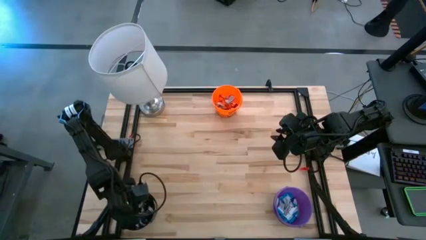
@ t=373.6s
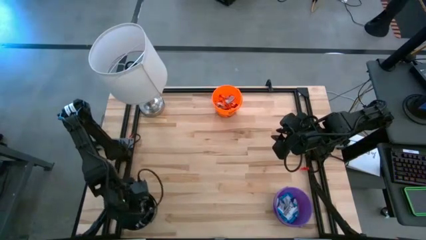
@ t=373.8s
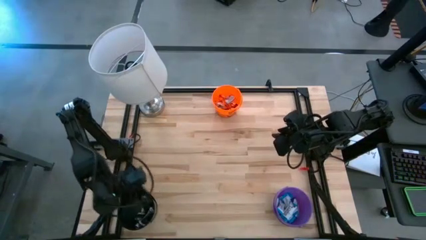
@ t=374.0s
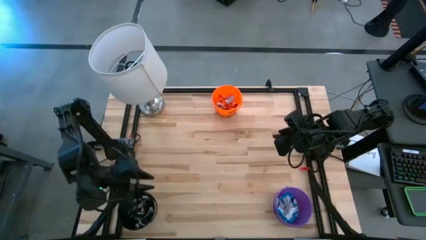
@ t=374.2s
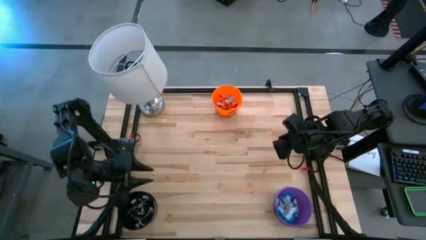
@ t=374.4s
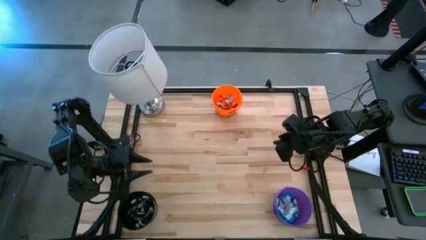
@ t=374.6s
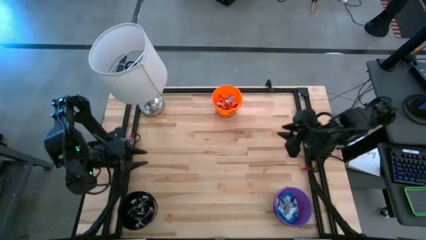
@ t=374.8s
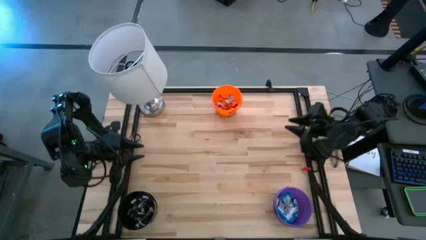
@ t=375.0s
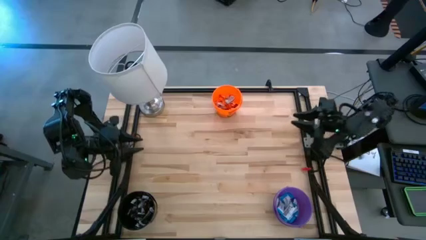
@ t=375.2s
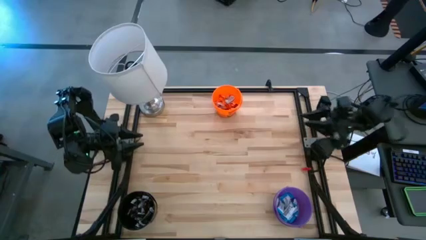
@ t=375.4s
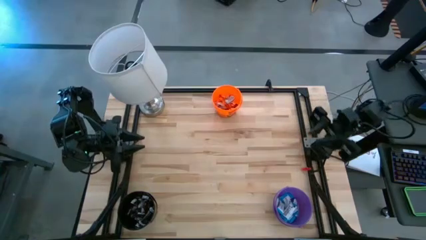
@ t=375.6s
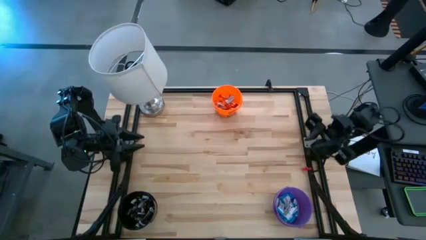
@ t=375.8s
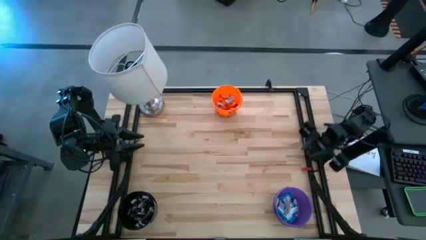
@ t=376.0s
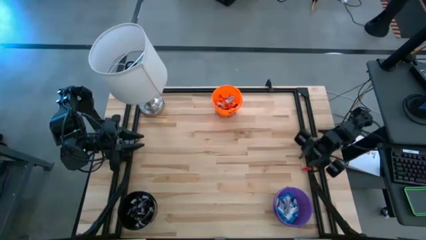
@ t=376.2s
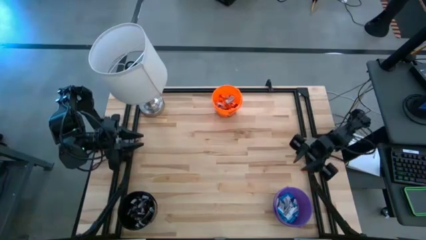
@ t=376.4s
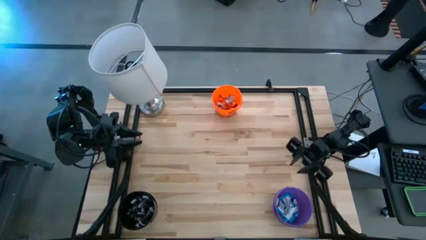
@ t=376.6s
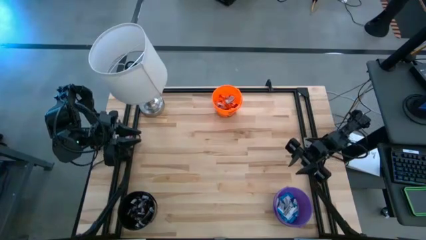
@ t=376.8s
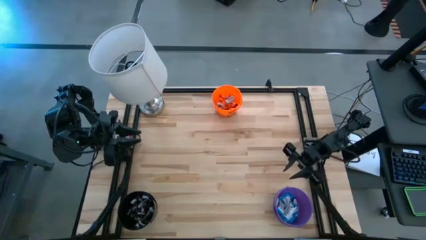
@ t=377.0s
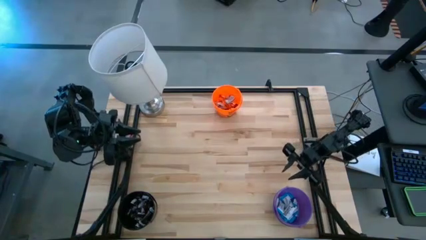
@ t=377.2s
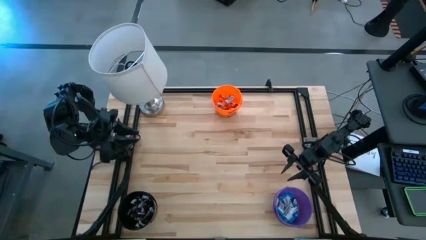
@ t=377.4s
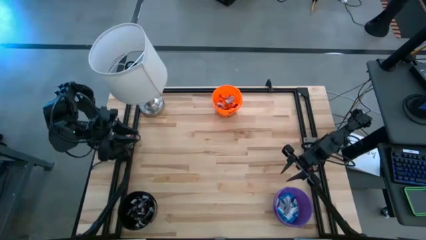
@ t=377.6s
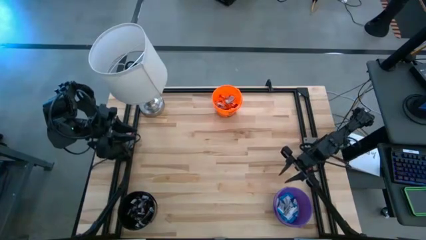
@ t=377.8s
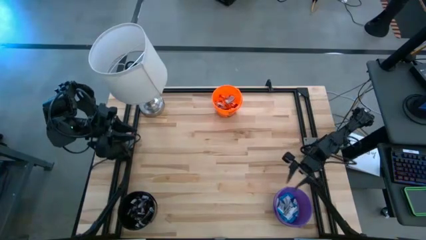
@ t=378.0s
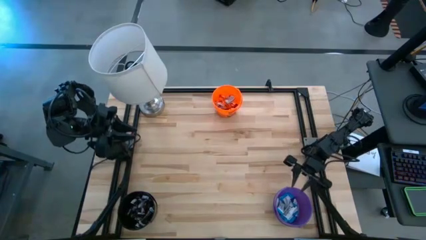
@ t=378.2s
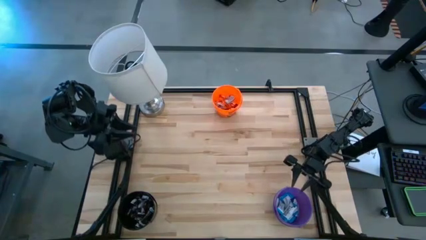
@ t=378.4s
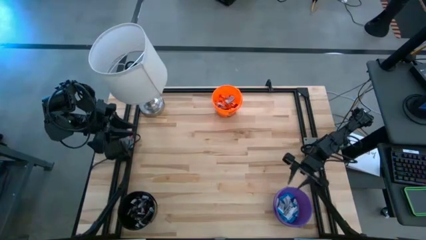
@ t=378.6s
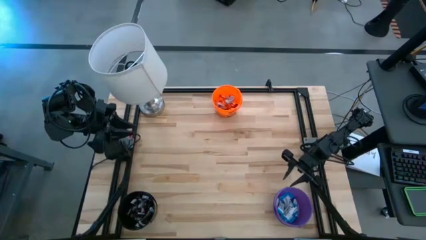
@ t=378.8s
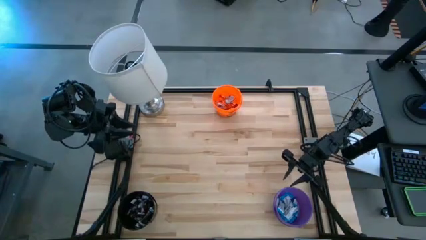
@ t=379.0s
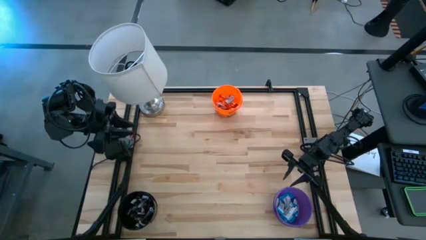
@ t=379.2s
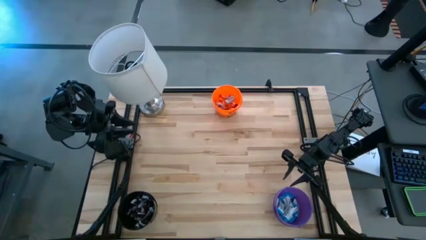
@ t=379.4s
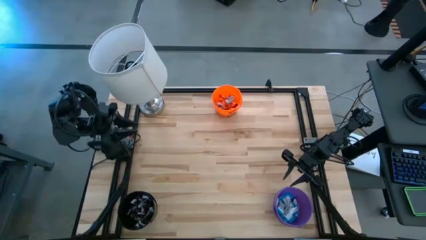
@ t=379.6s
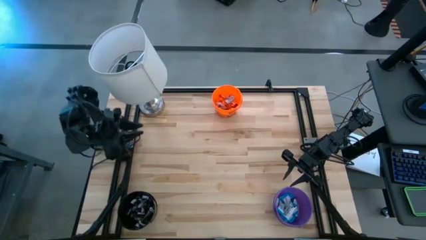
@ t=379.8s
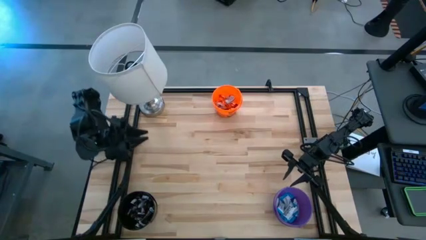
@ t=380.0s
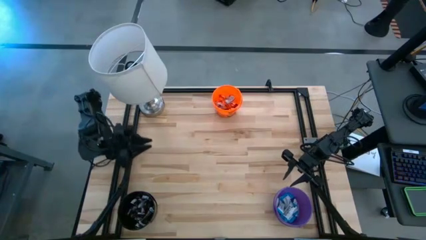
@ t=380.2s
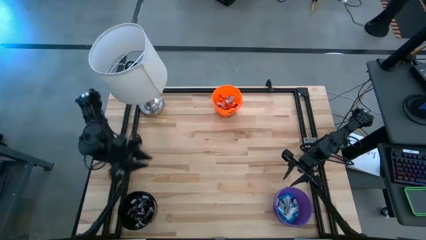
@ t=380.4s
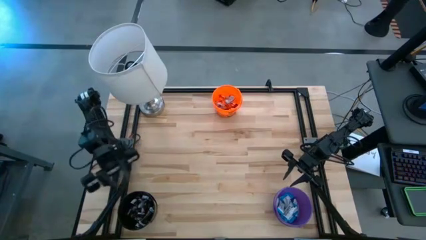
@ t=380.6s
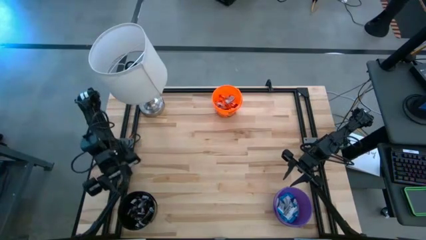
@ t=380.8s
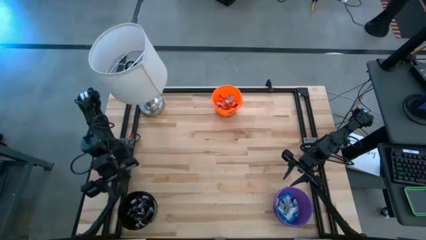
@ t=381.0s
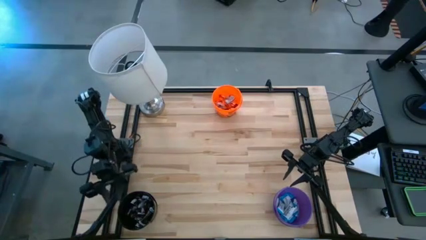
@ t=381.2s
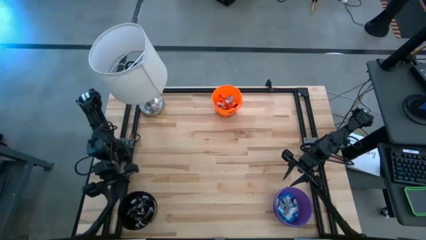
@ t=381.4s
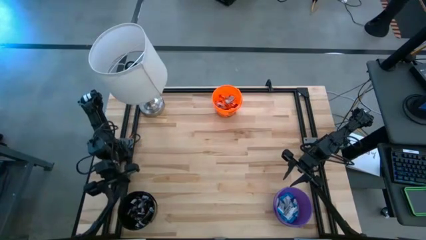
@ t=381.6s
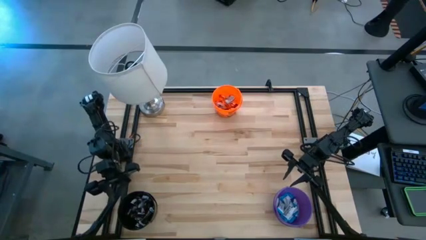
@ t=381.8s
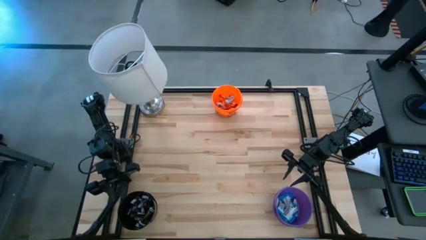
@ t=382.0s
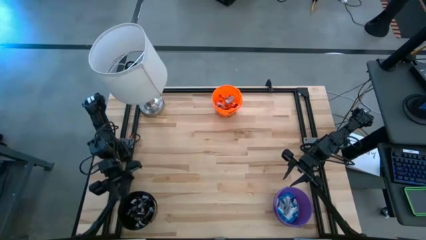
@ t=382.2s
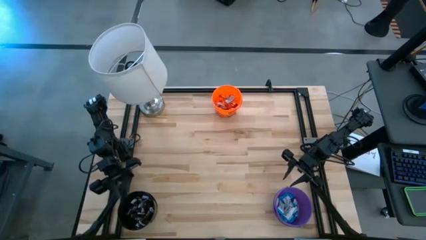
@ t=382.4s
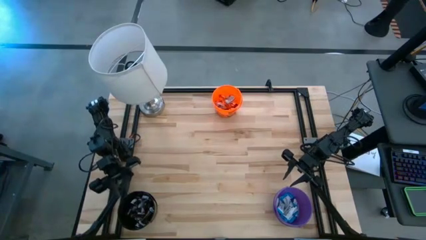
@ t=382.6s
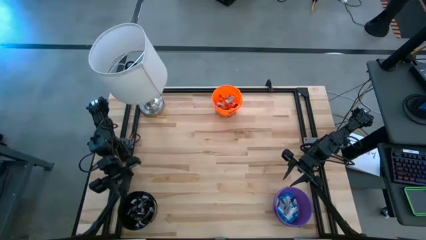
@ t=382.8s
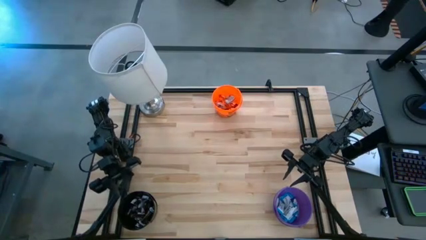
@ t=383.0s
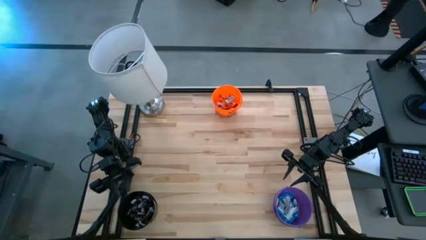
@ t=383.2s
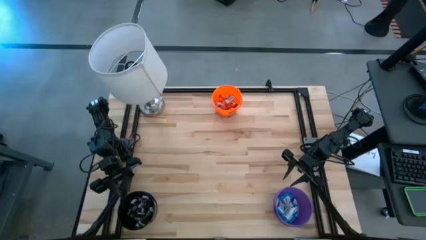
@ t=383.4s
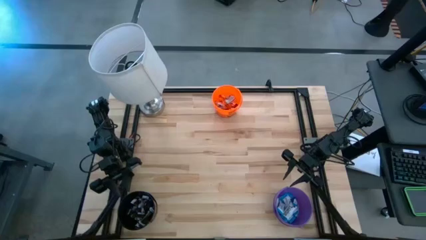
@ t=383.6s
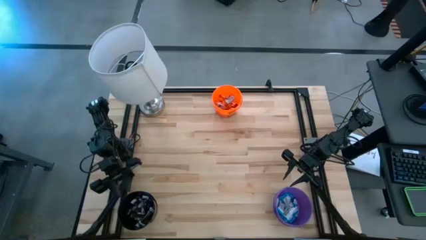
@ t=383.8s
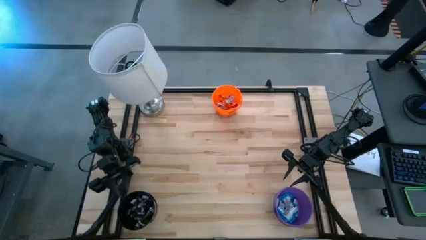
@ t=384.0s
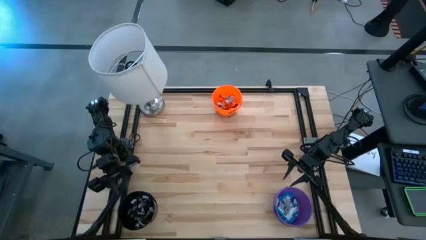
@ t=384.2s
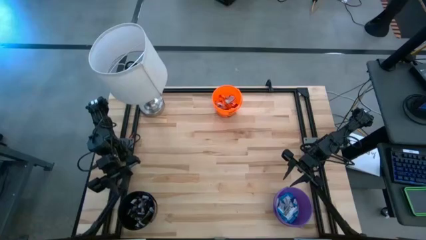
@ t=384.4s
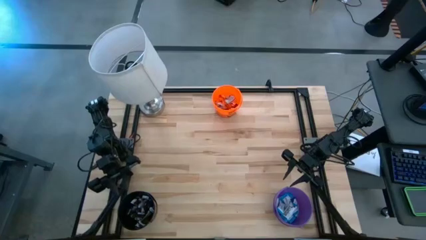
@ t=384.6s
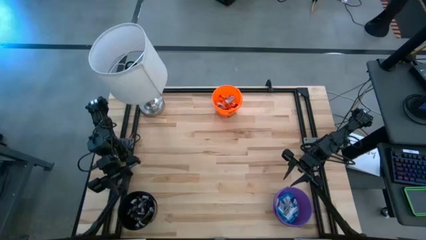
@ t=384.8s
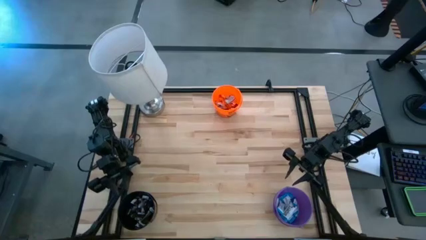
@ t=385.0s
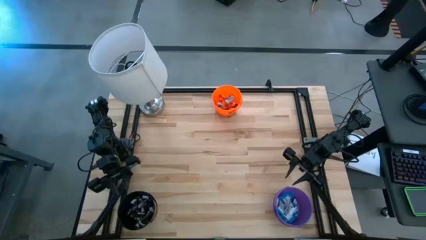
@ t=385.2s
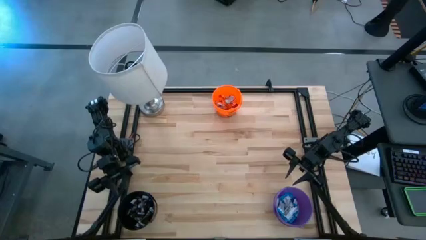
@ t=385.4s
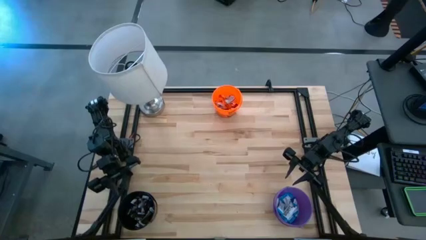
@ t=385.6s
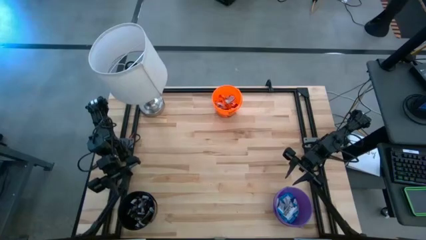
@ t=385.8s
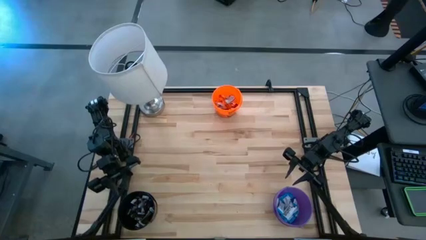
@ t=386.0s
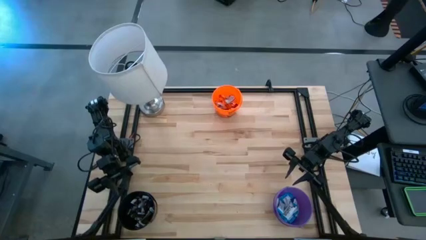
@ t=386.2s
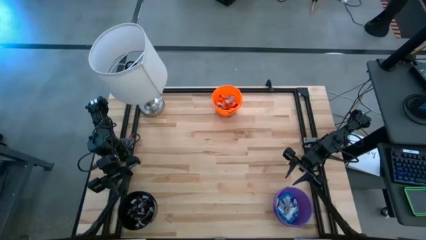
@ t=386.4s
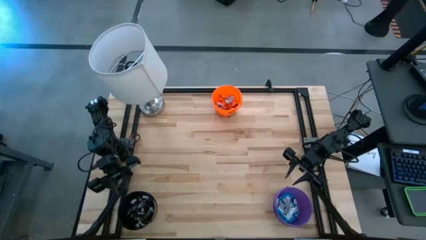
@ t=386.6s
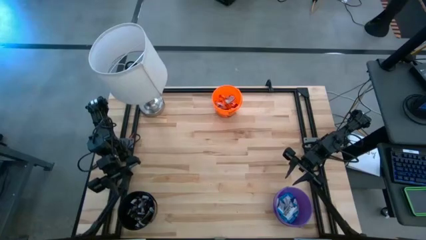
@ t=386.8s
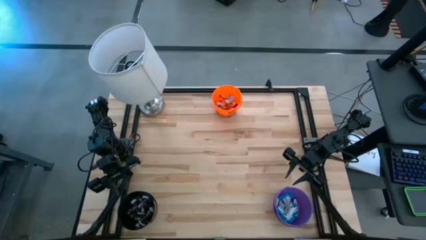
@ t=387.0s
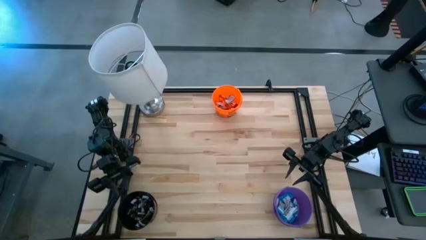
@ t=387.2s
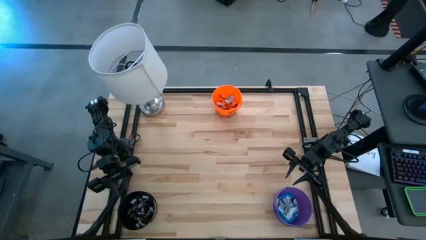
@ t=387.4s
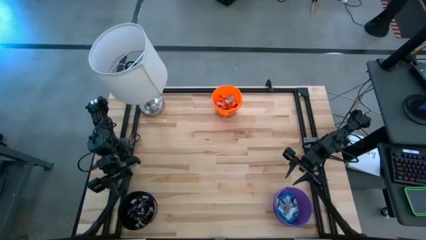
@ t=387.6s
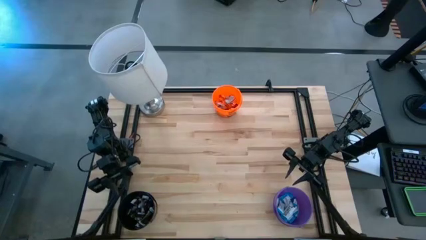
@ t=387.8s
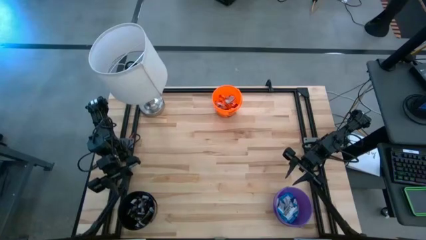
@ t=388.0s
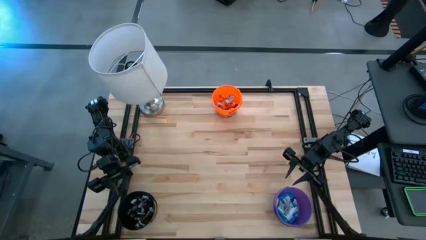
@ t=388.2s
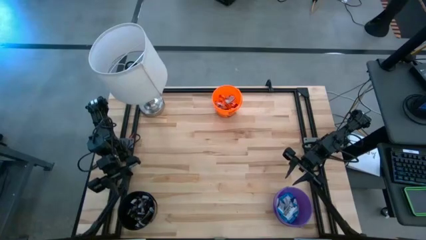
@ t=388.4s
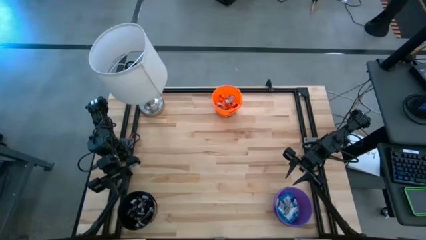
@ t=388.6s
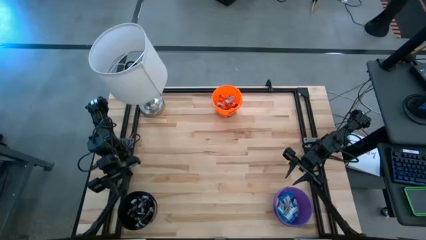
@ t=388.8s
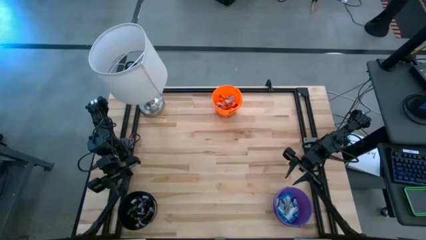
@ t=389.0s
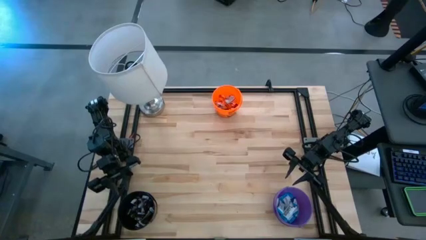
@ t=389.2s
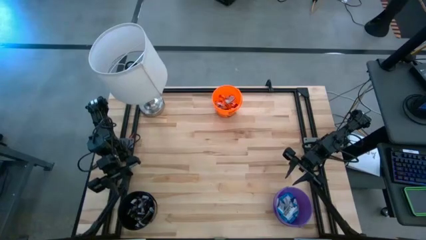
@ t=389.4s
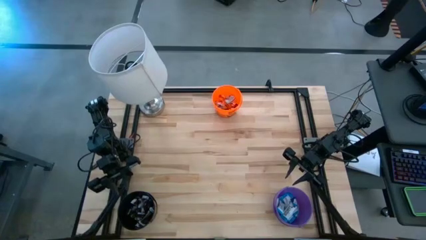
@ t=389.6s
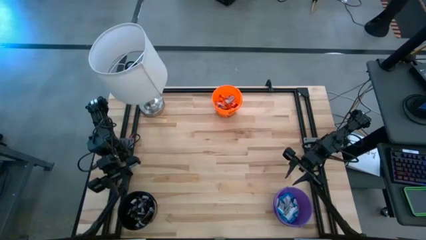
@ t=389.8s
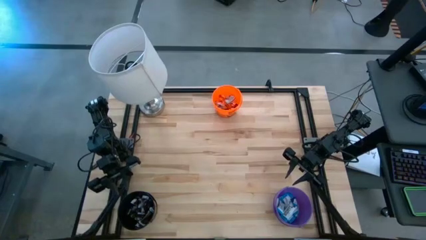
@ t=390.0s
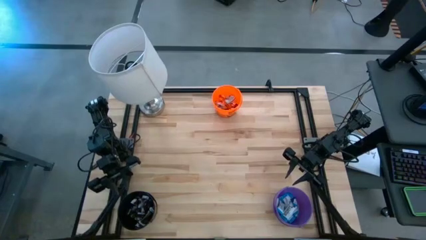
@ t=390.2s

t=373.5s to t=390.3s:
Task: Organize candy in baskets
Return to Home Position
